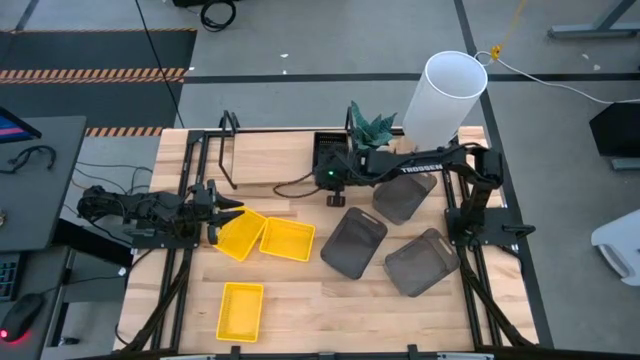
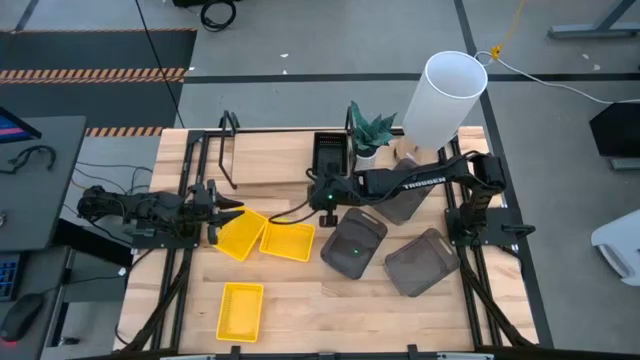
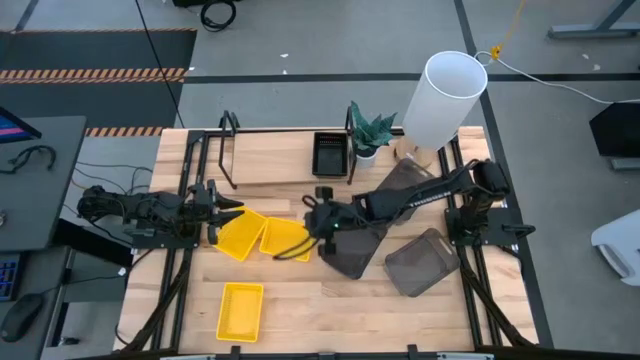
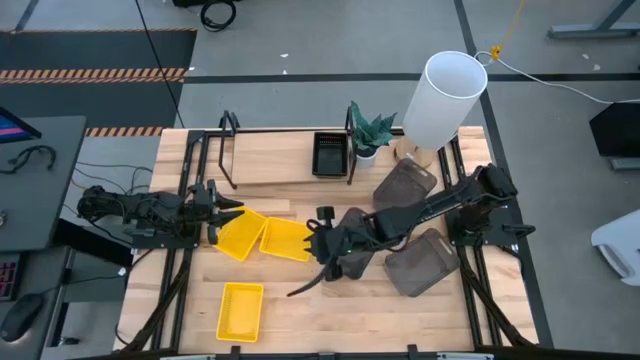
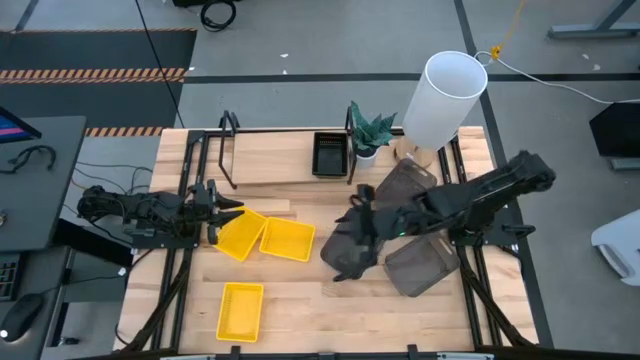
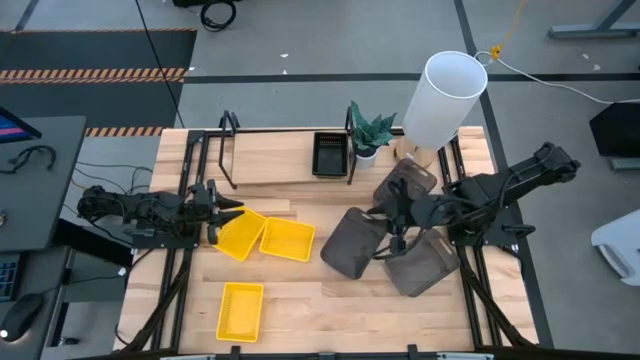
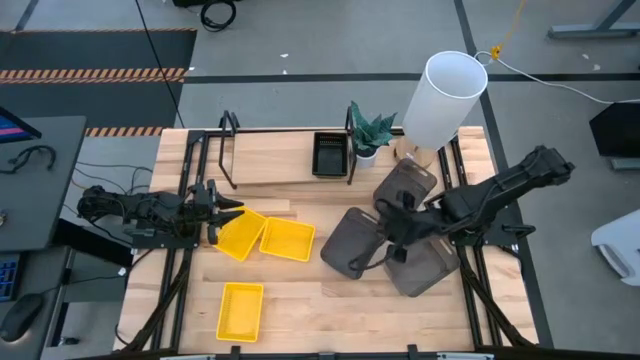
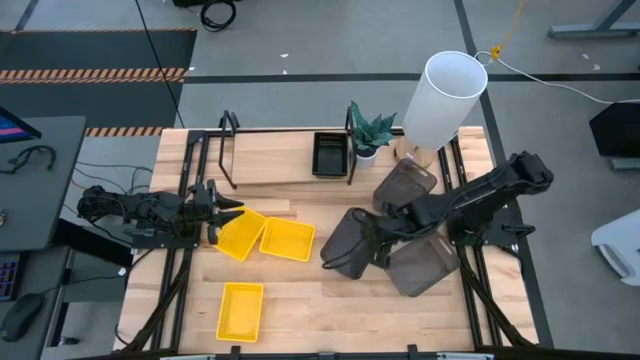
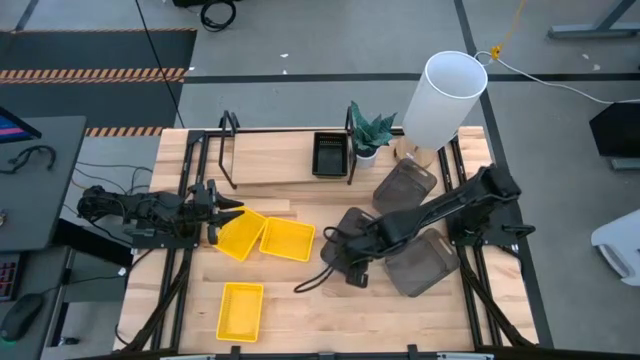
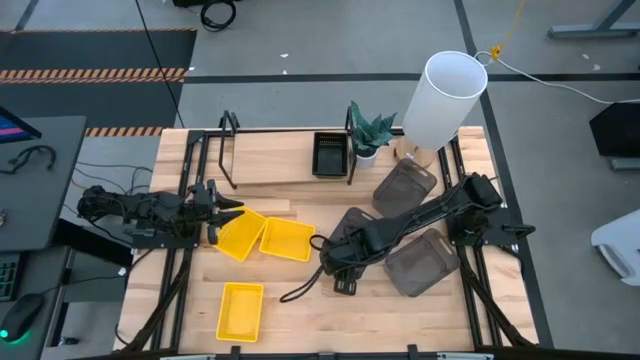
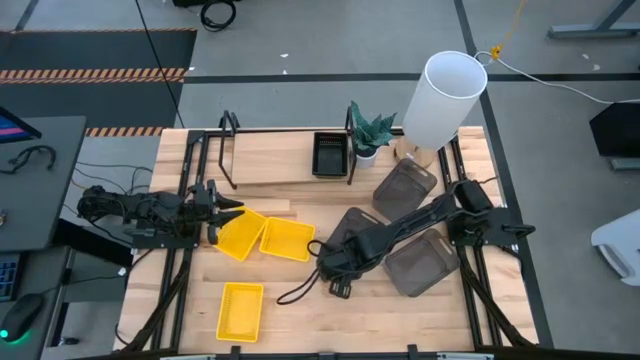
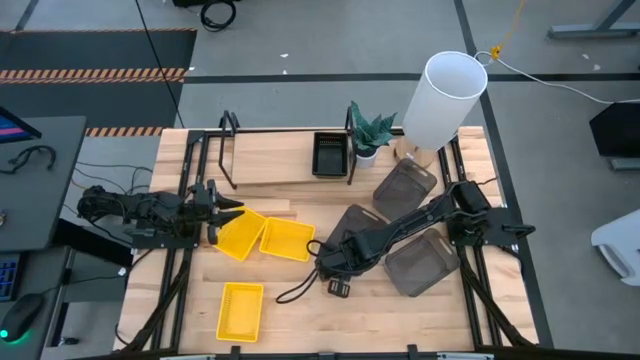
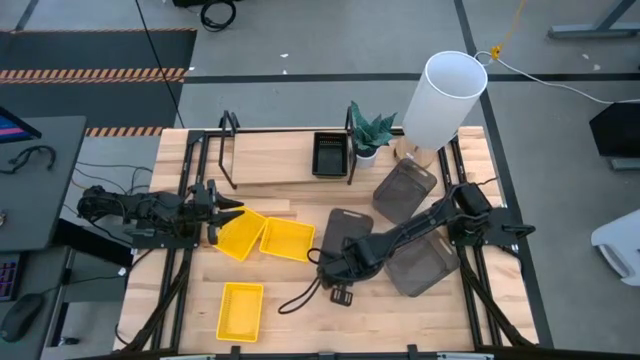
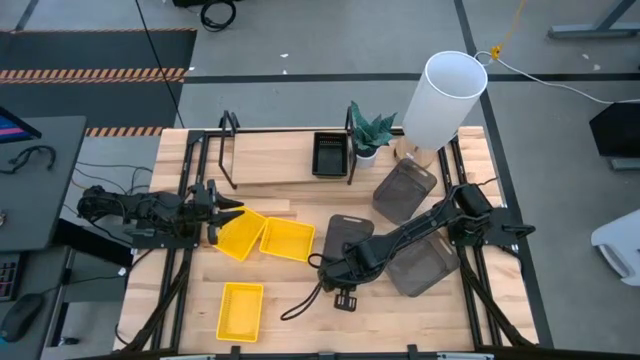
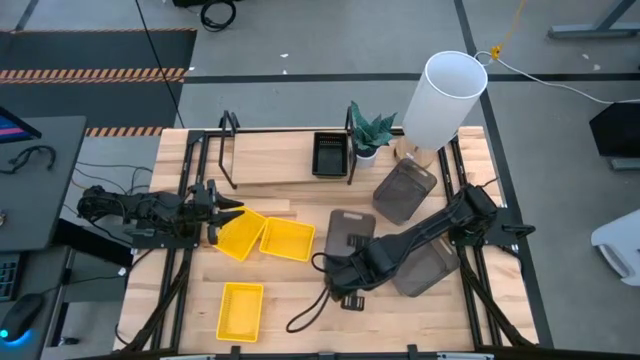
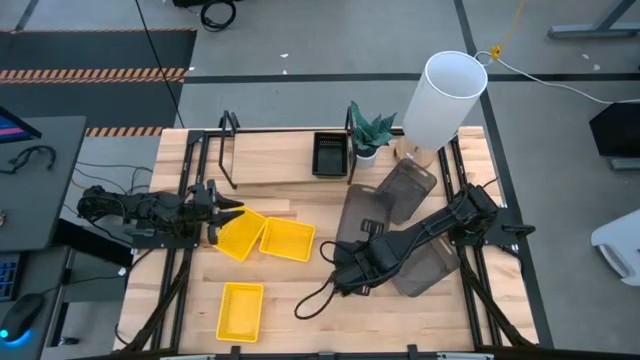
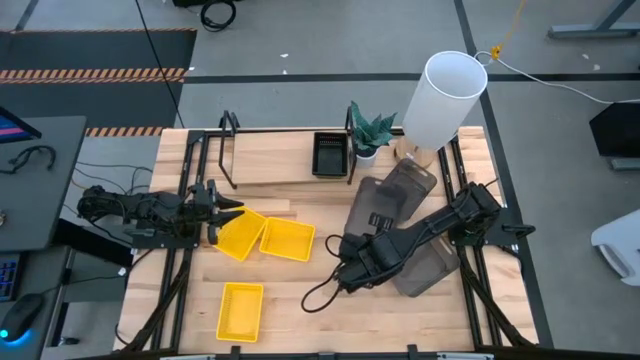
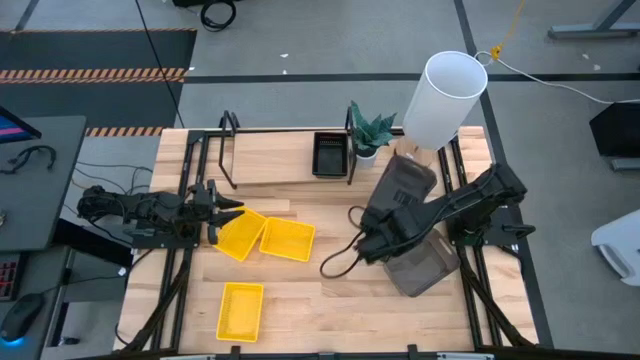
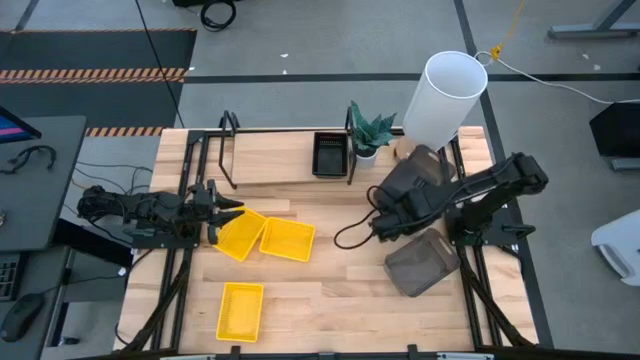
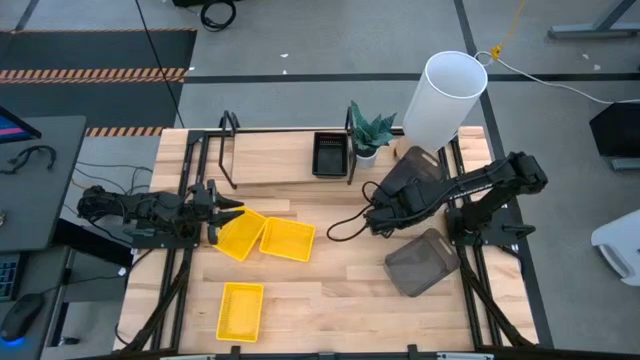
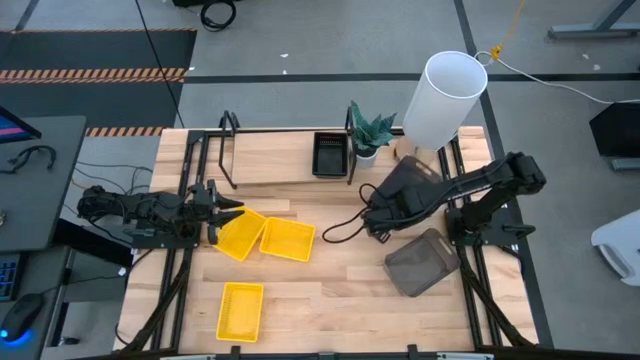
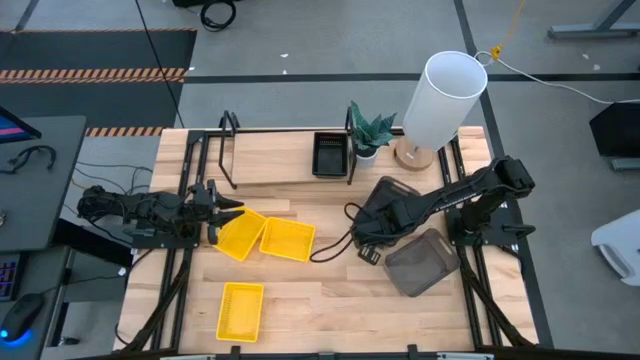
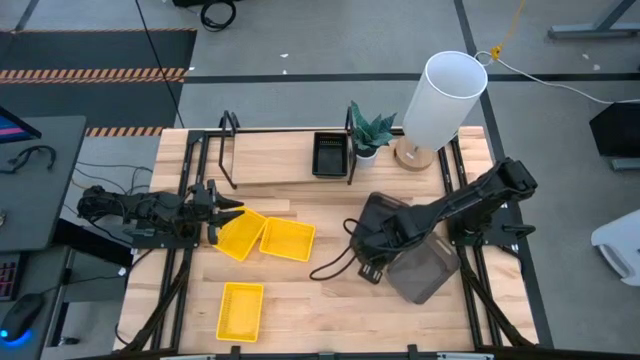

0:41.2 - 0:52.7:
Task: Stack baskets on shelf by color
Stack the middle transparent black bin on the top transparent black bin

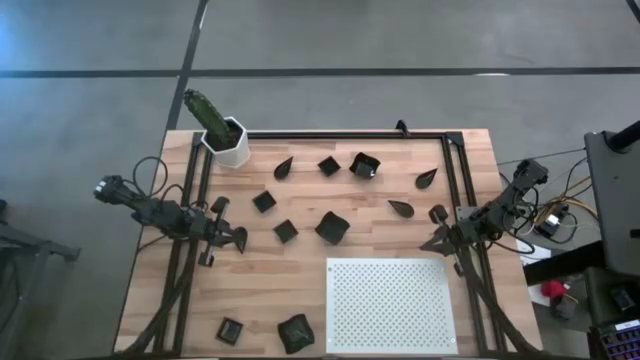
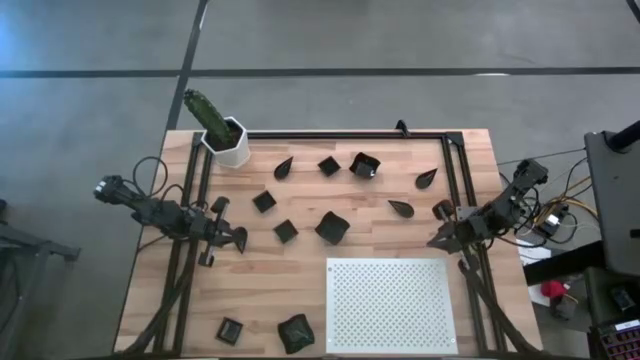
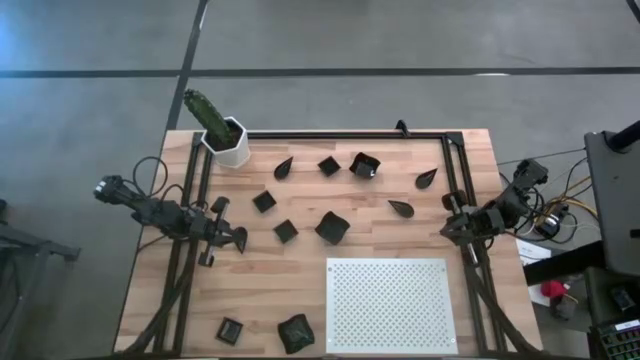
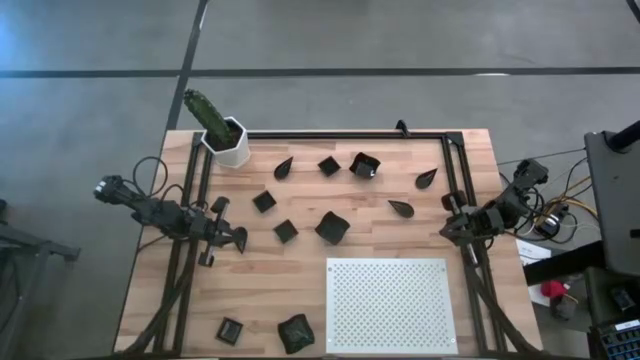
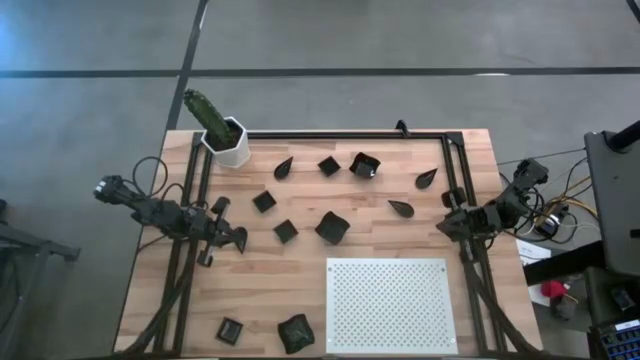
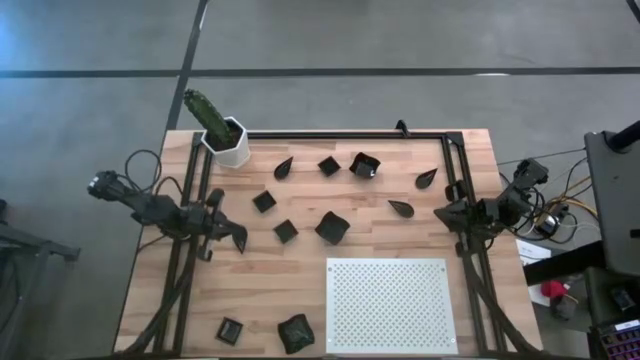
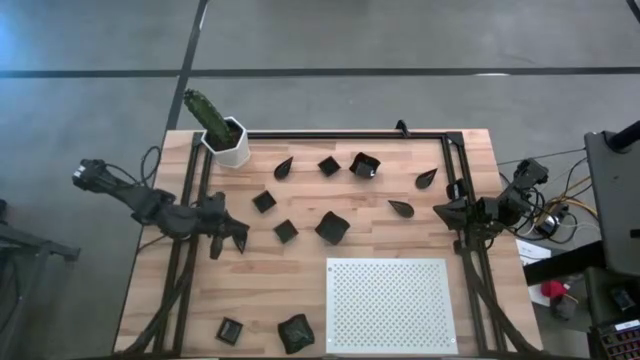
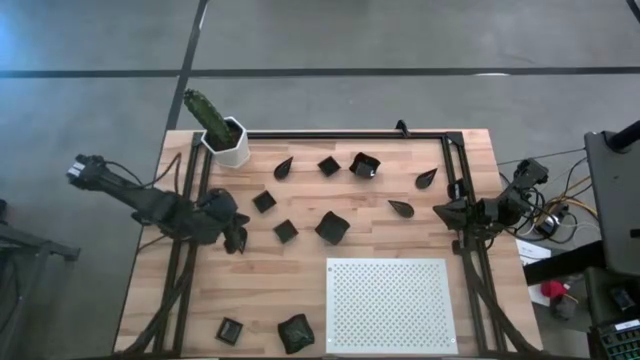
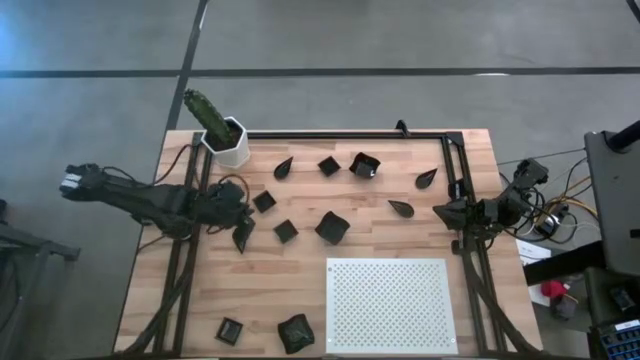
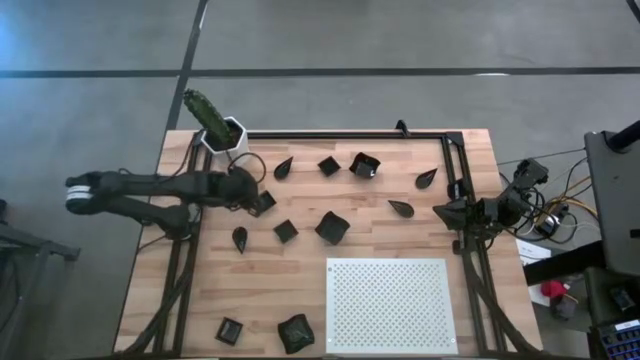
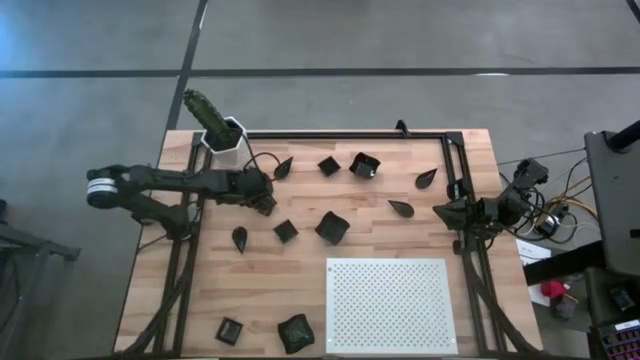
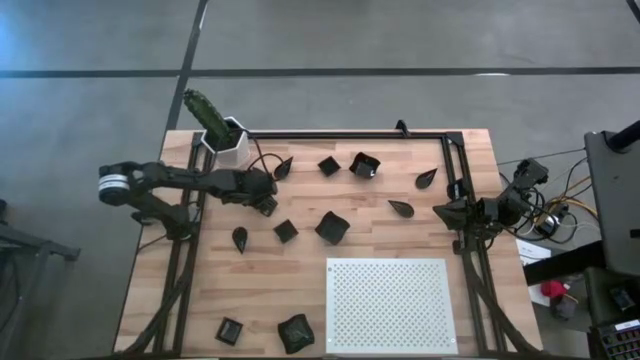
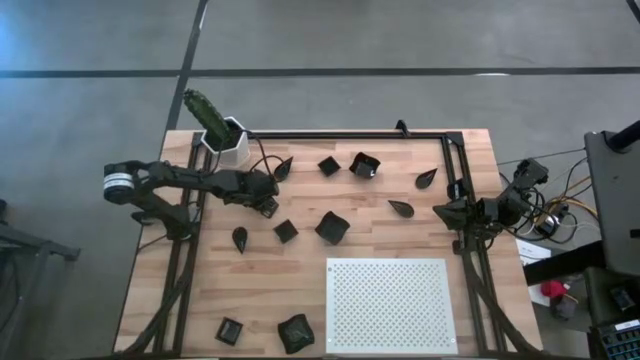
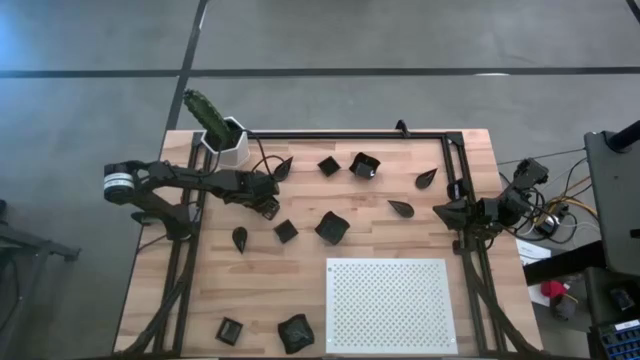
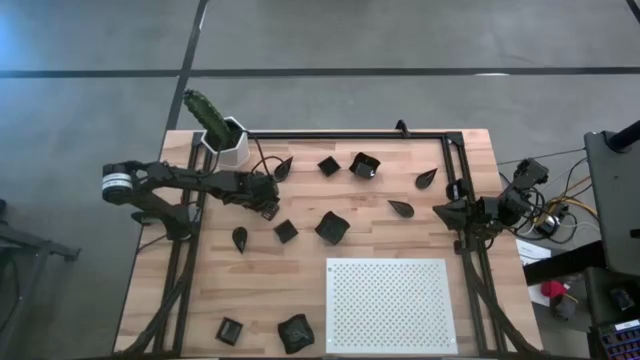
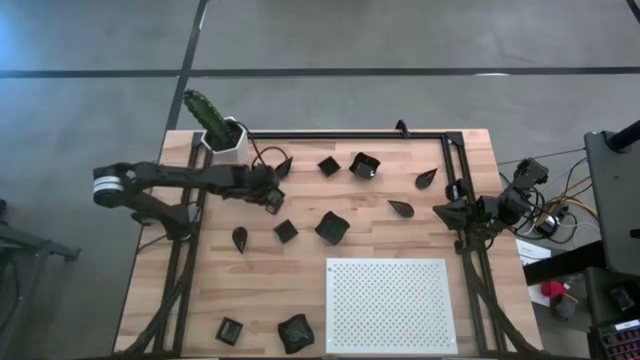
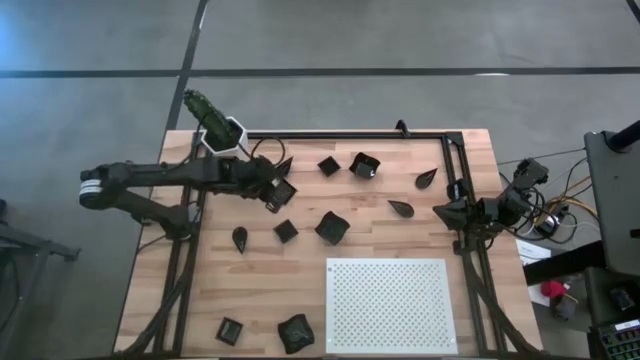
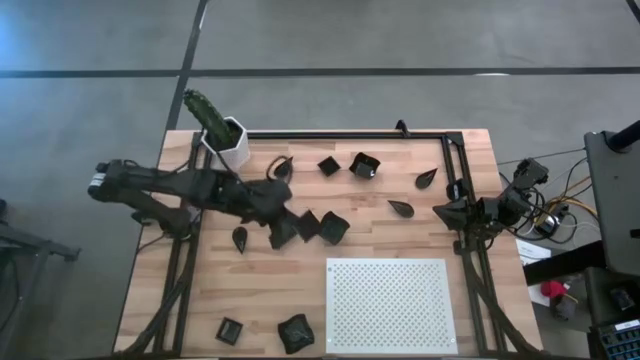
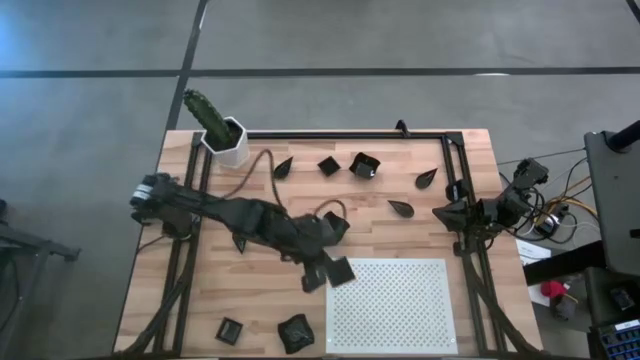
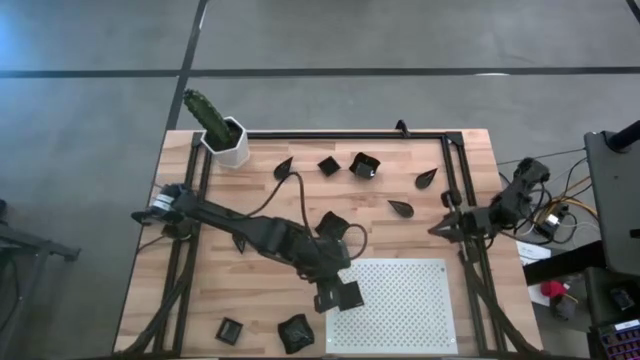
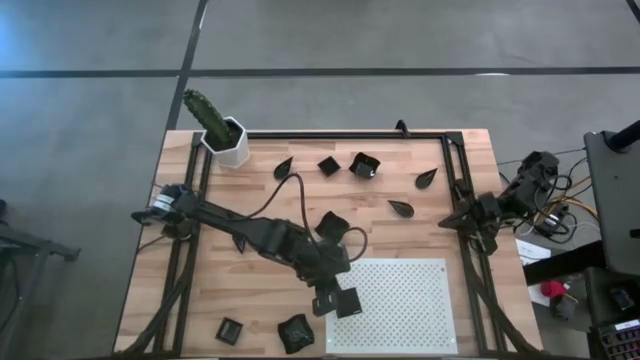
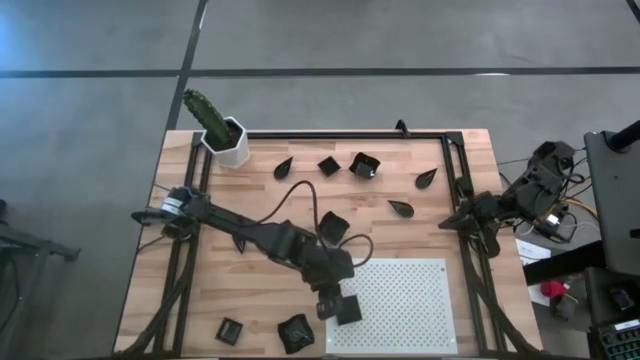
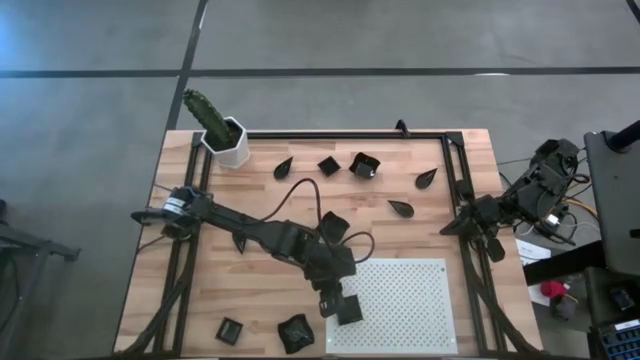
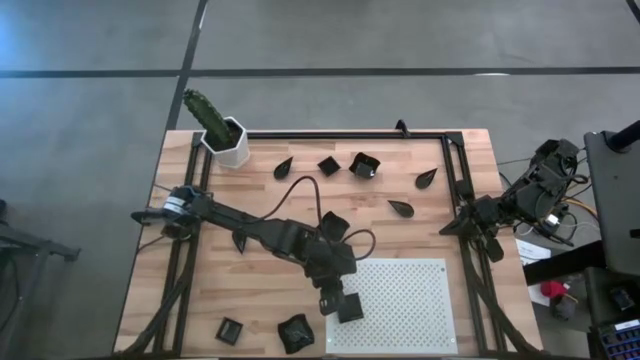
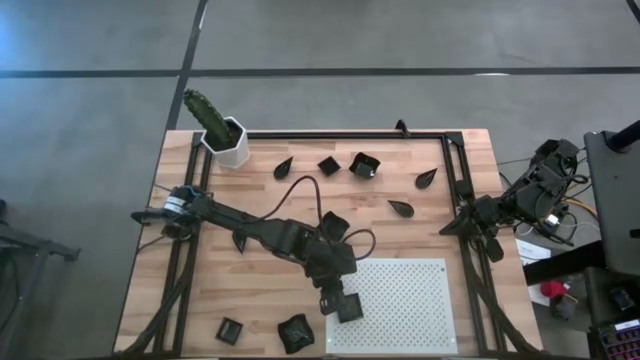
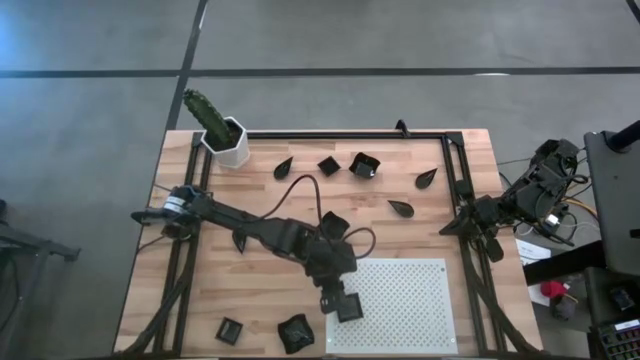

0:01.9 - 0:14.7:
Task: Pick & Place Mini shaped plates
Put the square plate on the shelf
